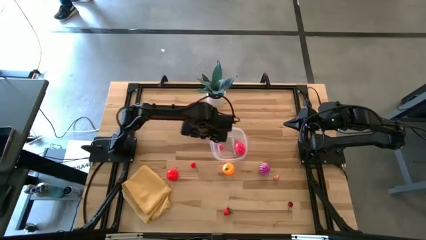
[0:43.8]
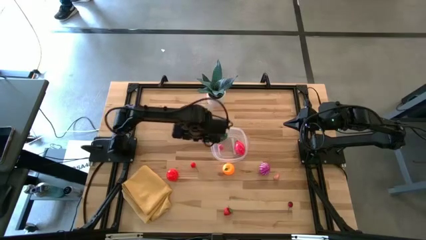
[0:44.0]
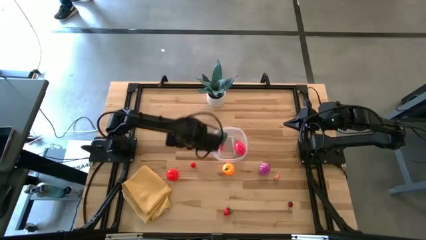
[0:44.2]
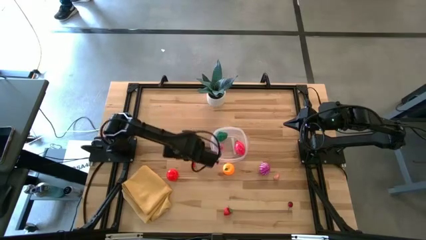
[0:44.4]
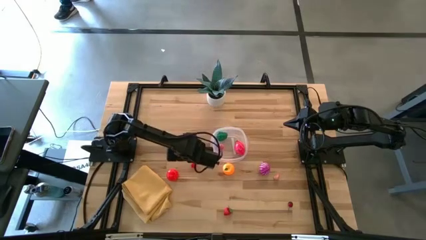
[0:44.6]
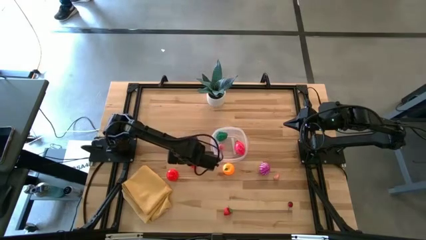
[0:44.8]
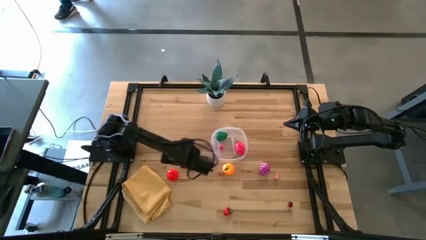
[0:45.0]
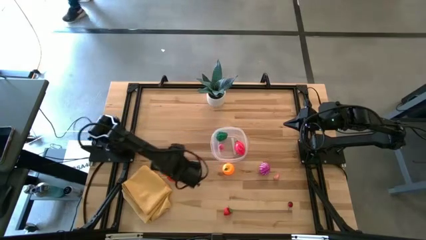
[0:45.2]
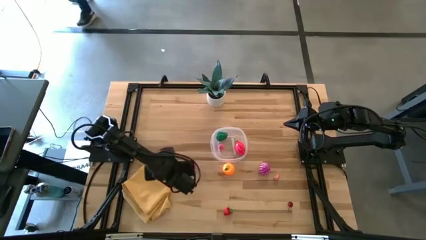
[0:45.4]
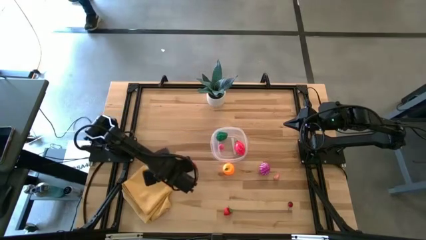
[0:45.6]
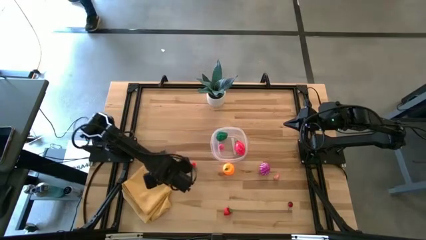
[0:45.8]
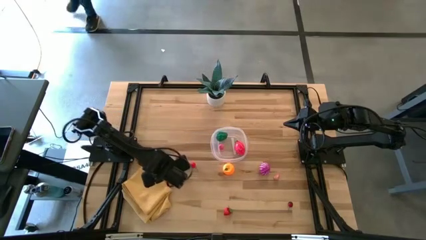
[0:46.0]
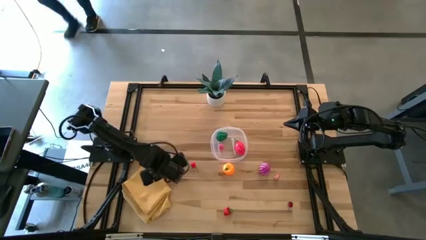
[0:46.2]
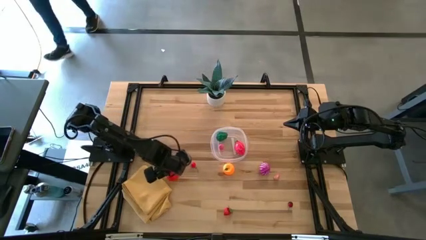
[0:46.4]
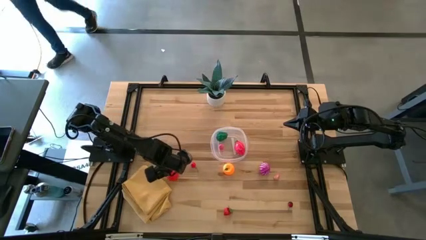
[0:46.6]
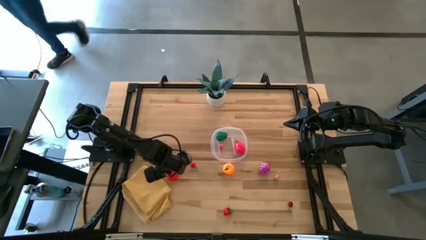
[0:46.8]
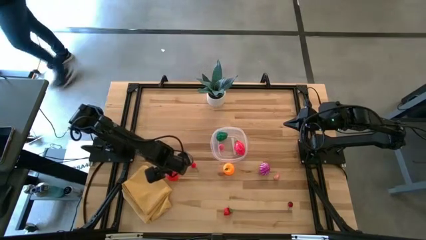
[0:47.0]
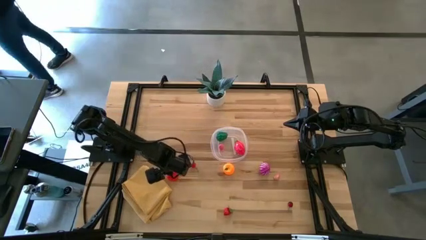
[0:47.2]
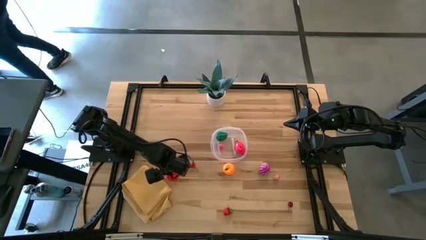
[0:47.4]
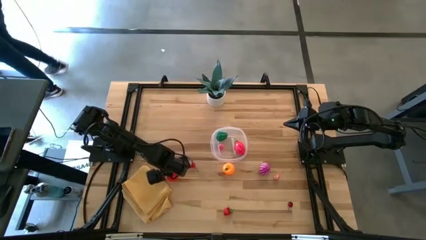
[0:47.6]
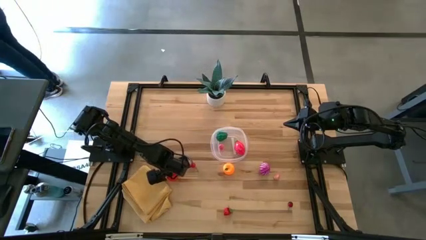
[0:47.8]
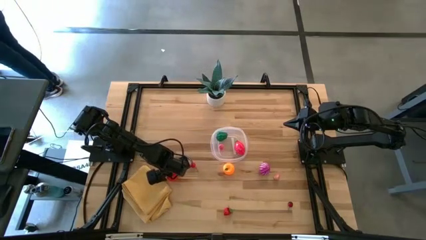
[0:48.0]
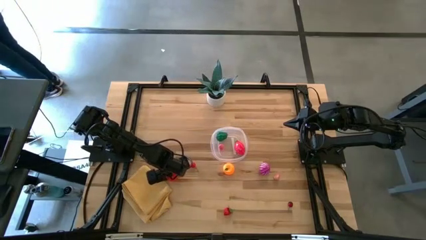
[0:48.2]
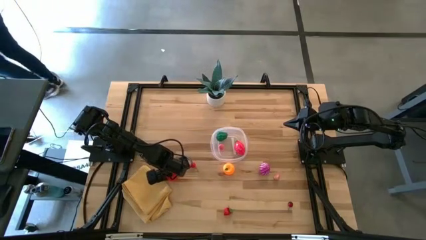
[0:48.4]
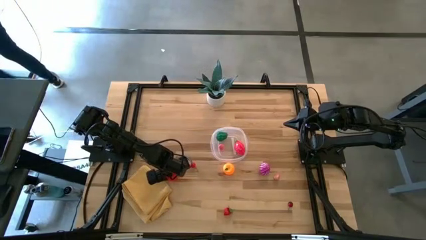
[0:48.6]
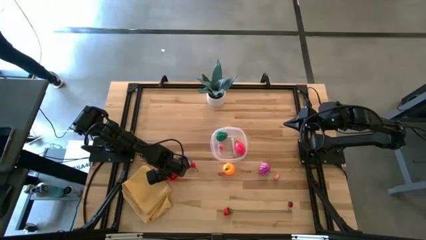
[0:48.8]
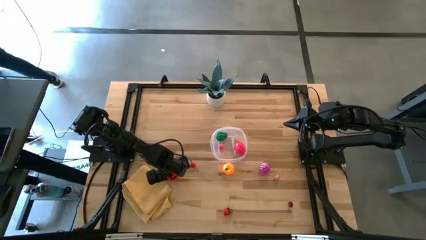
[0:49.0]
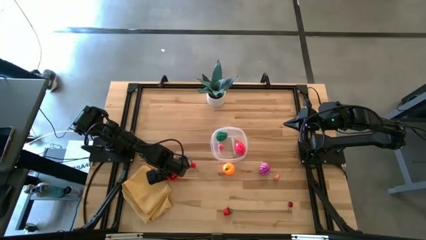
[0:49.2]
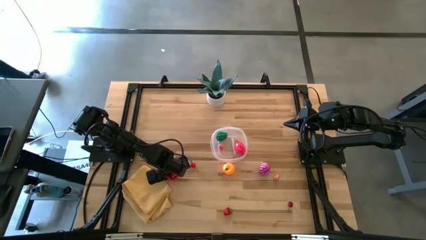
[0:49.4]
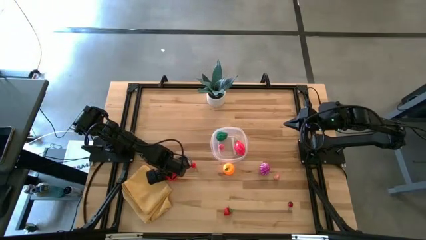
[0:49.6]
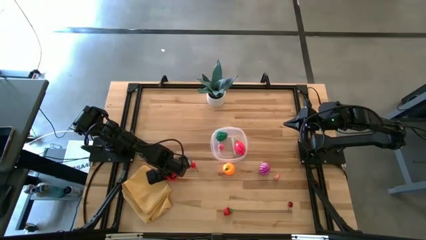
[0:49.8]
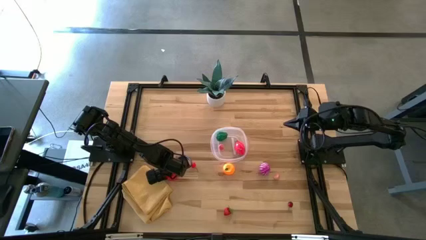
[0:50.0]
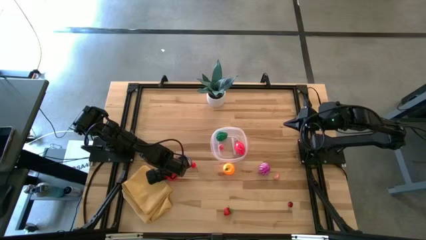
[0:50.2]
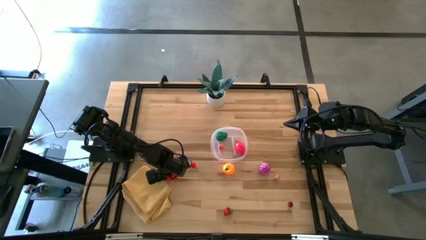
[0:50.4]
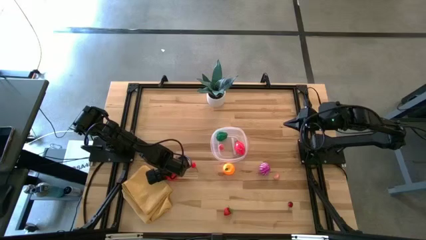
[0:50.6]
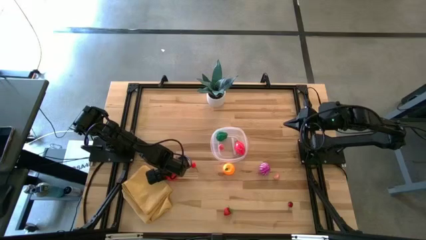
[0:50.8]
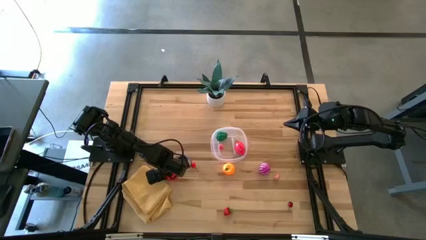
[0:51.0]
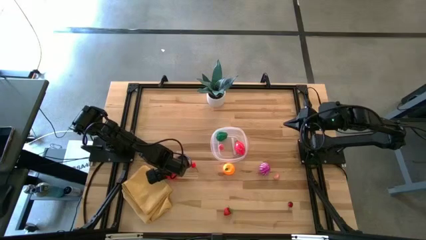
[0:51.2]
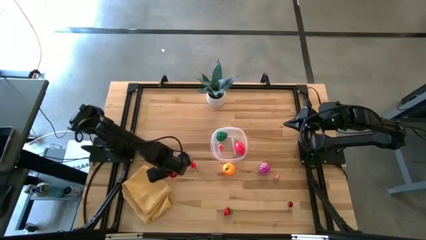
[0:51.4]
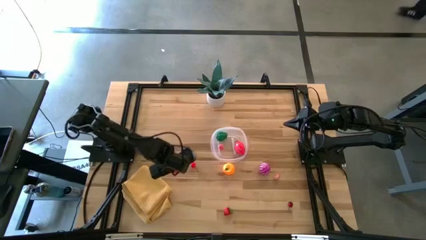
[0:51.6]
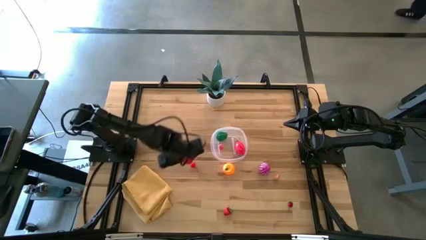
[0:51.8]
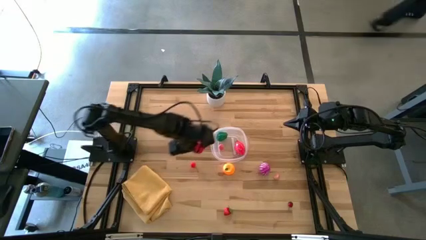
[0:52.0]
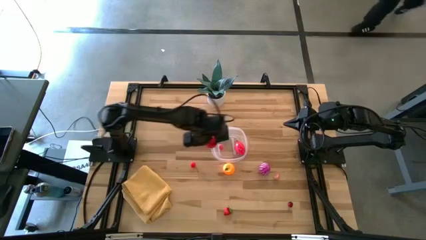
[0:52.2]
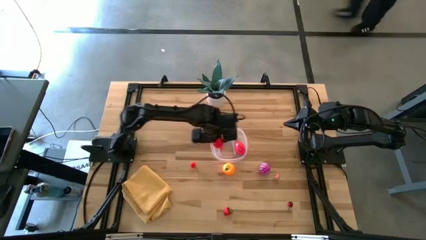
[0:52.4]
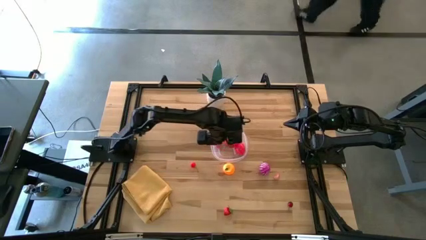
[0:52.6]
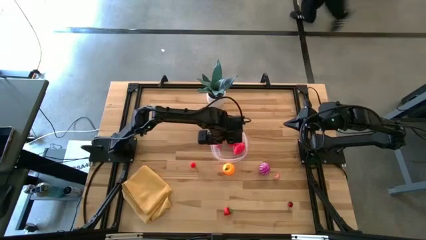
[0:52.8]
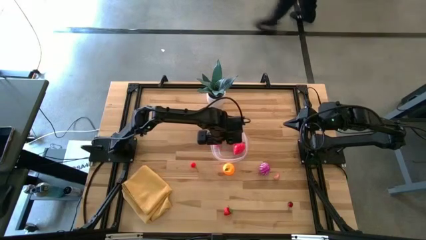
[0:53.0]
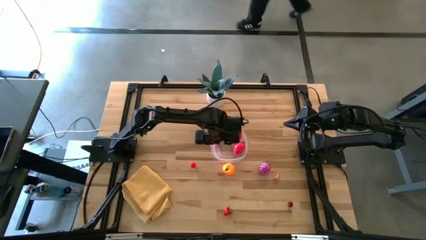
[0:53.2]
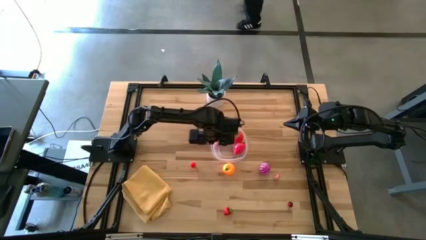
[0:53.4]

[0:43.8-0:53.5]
Task: Pick and placing Produce into tupperware
Put the tomato into the transparent bin

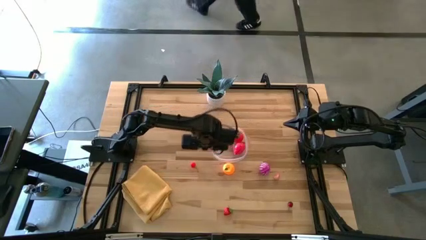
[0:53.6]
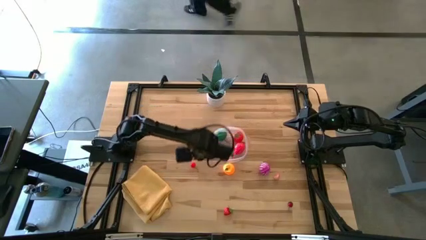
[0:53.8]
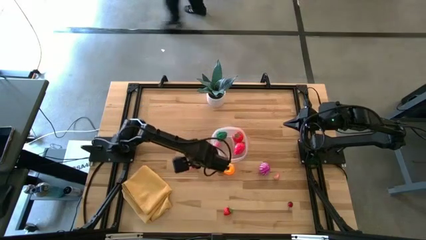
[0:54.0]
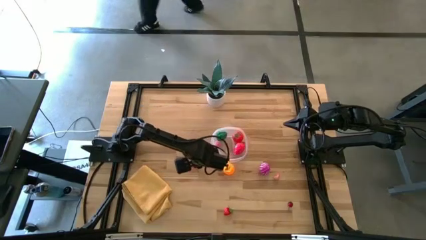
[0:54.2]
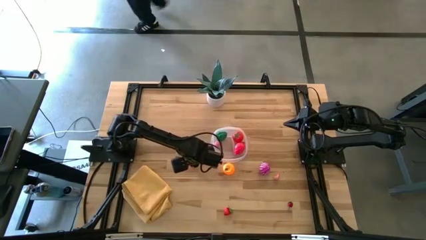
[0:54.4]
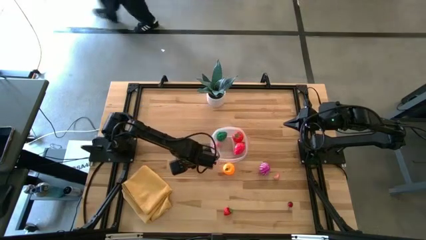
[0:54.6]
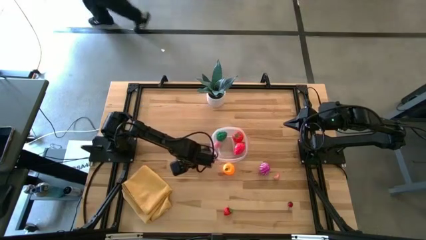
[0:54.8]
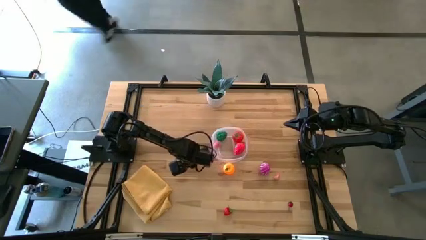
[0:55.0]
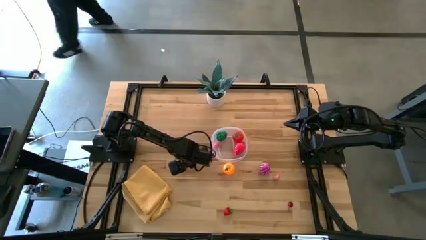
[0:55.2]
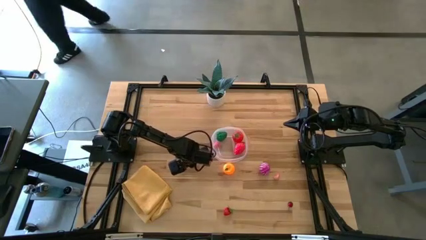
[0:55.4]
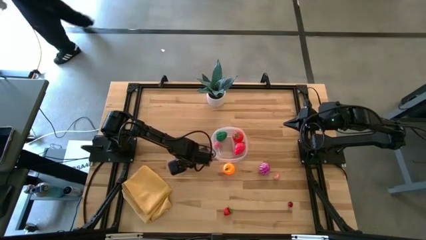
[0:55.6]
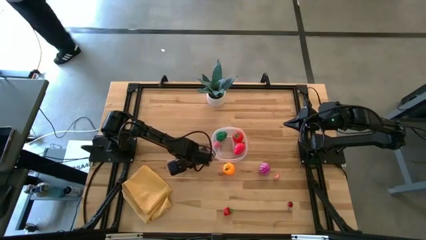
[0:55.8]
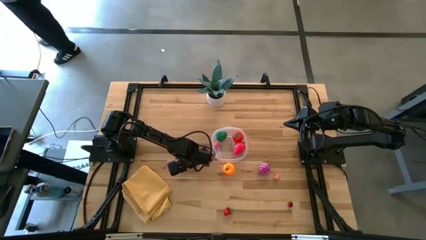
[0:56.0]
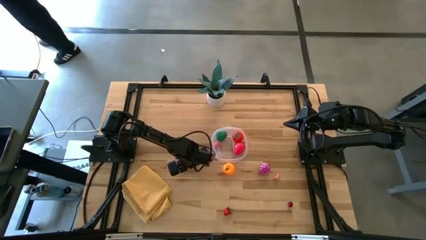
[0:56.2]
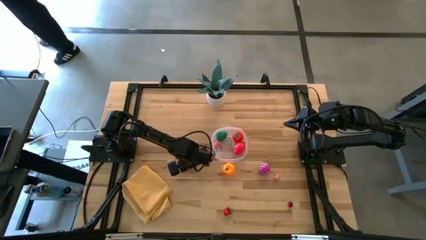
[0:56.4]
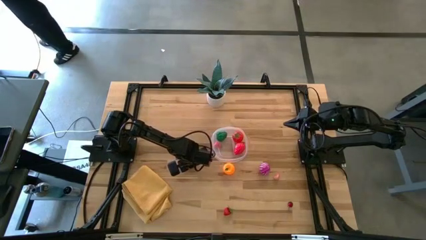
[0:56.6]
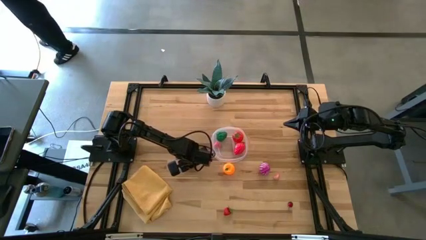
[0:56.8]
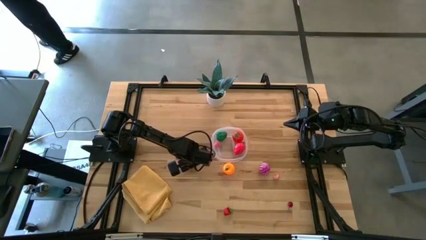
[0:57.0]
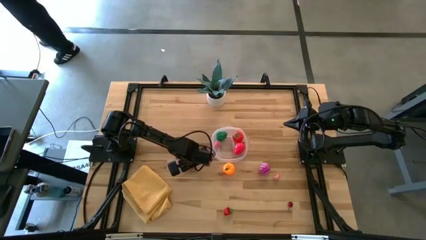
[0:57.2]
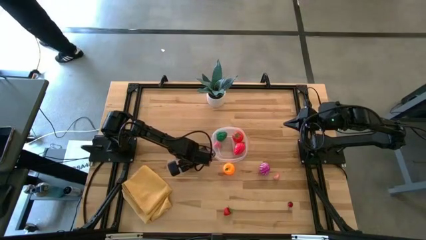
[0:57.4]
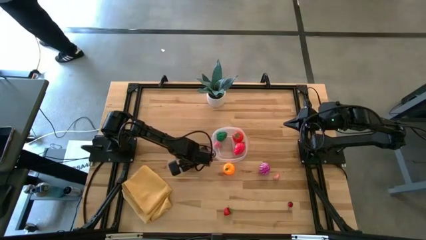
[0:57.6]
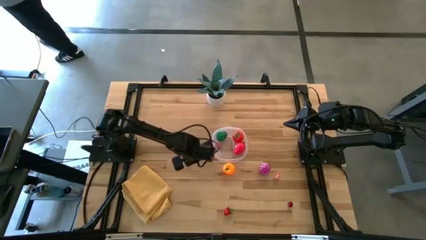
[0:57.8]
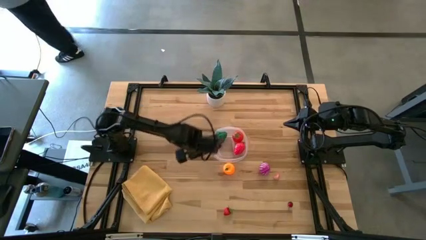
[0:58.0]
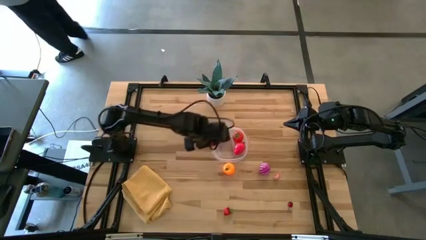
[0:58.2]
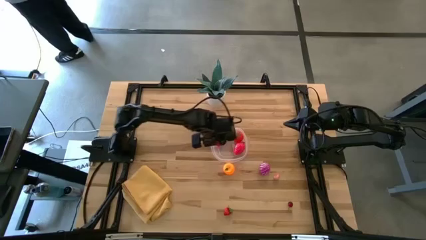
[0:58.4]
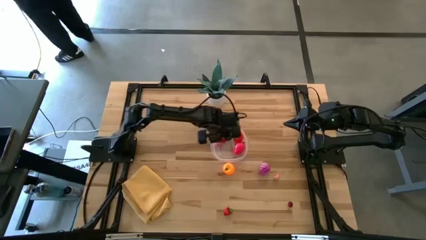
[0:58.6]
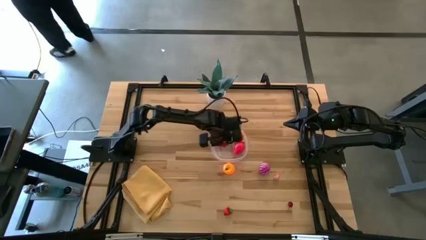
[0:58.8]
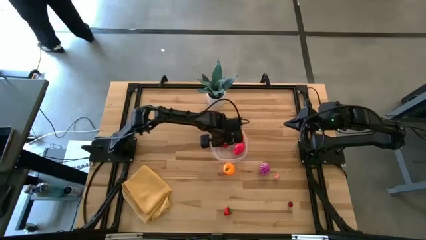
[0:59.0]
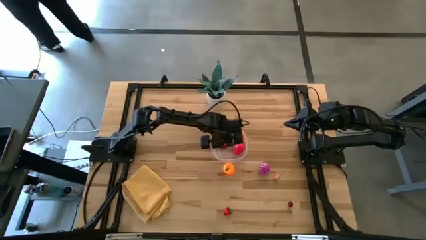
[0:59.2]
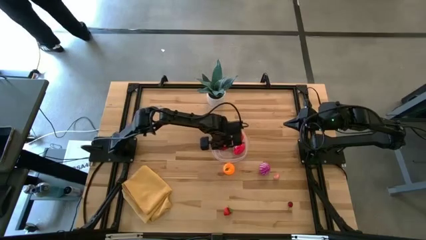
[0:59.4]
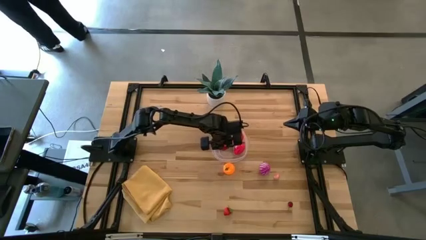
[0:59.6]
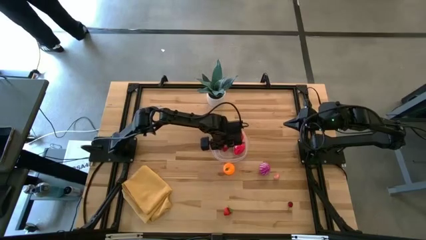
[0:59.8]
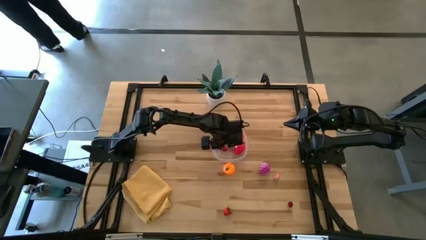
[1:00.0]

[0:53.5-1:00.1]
Put the cherry into the transparent bin
